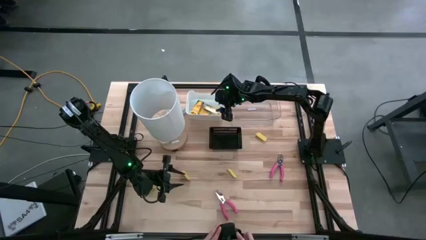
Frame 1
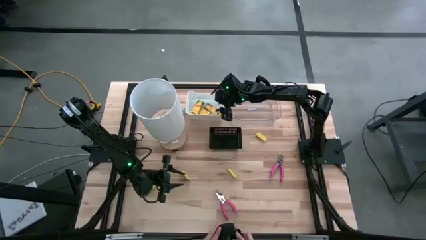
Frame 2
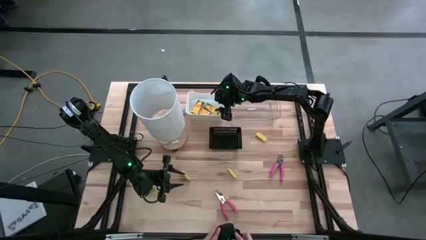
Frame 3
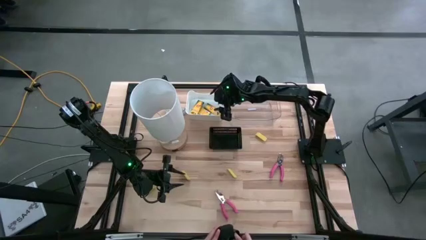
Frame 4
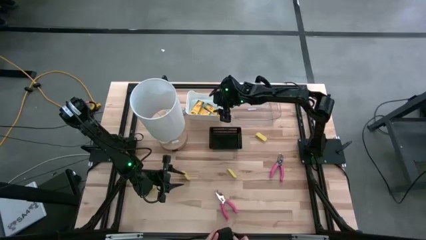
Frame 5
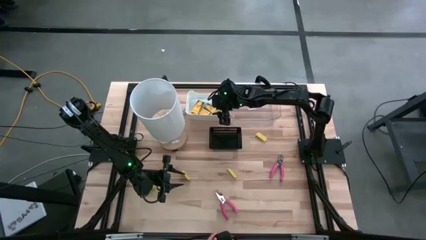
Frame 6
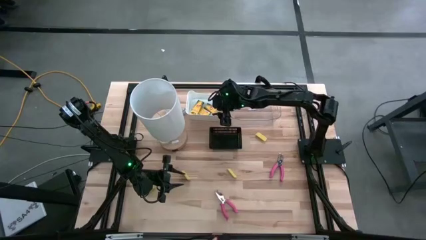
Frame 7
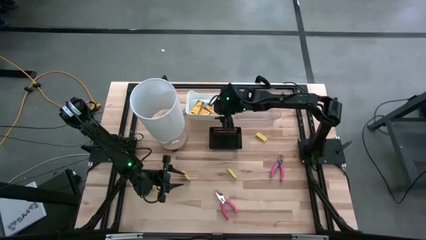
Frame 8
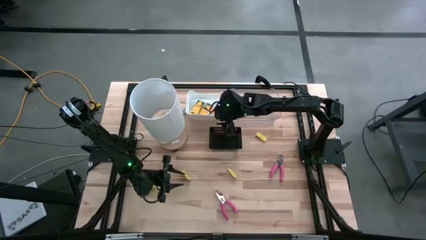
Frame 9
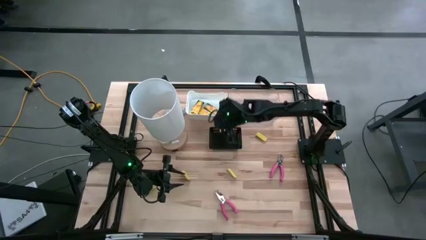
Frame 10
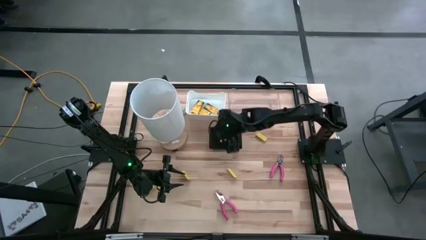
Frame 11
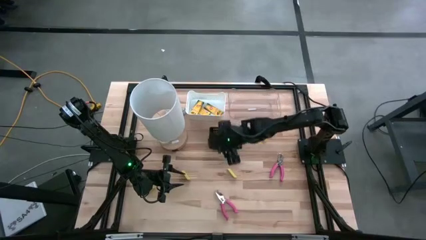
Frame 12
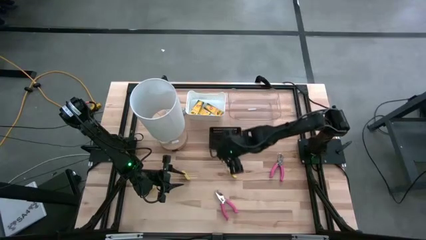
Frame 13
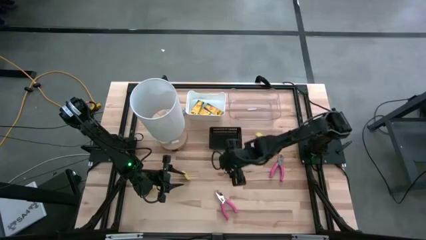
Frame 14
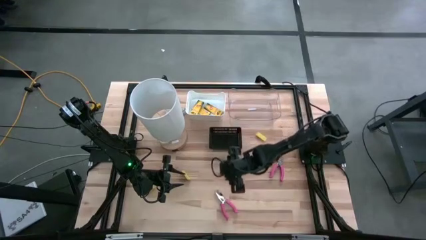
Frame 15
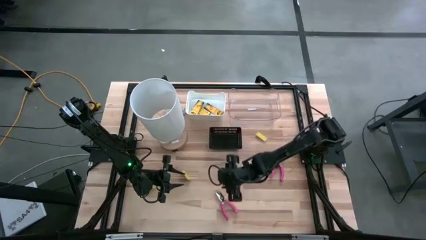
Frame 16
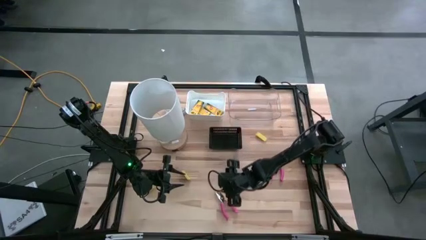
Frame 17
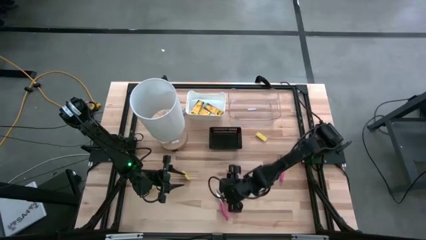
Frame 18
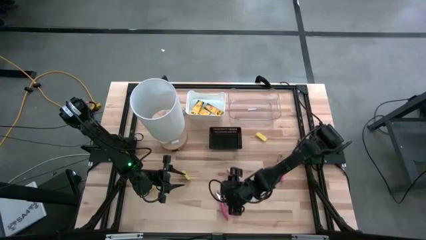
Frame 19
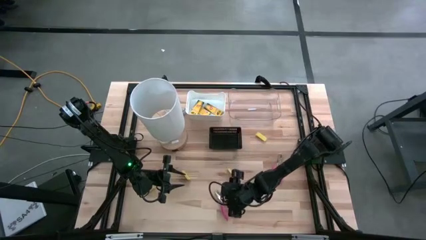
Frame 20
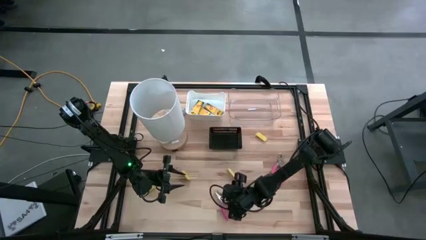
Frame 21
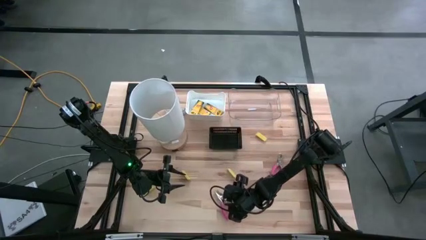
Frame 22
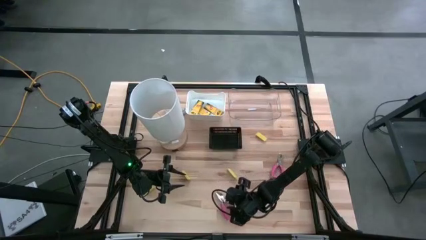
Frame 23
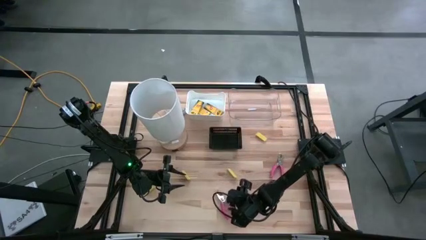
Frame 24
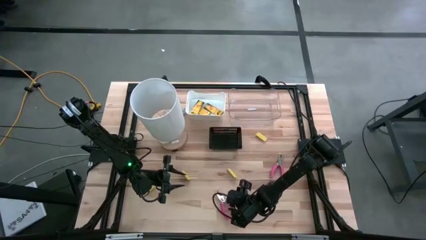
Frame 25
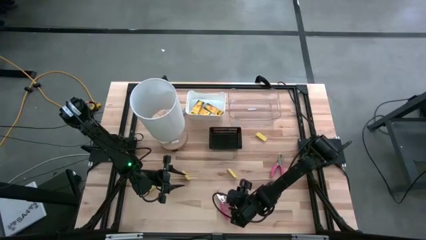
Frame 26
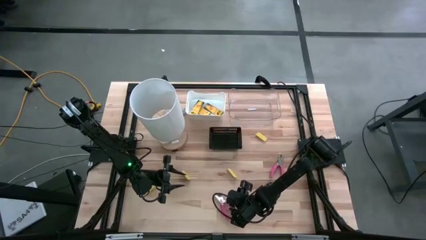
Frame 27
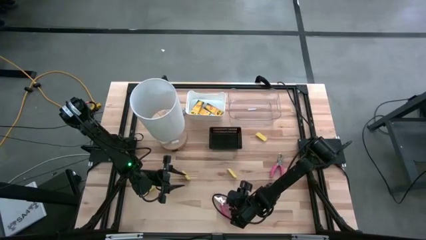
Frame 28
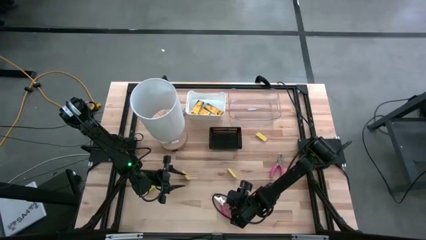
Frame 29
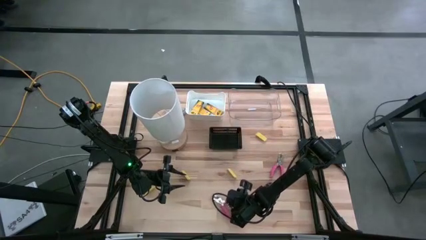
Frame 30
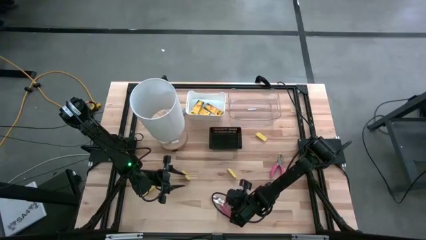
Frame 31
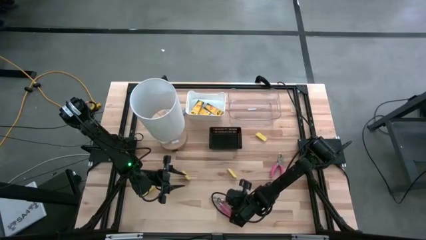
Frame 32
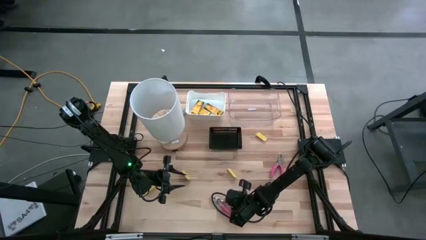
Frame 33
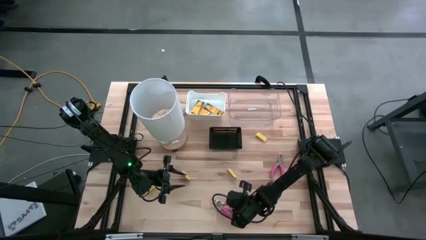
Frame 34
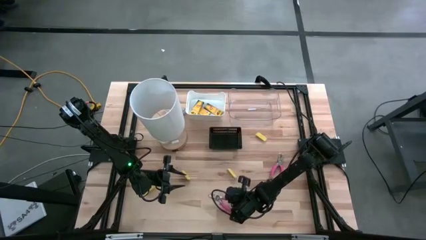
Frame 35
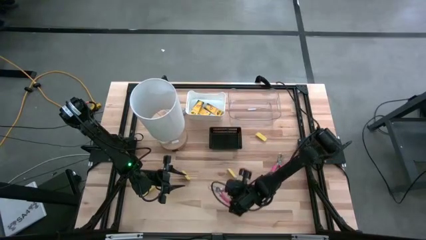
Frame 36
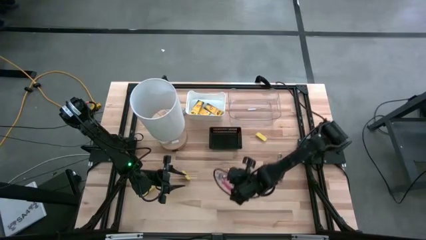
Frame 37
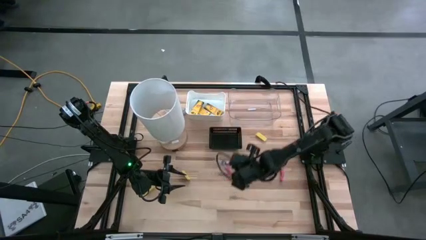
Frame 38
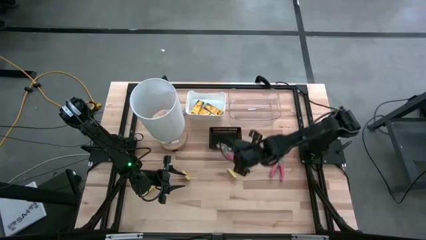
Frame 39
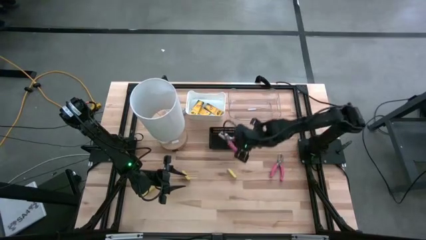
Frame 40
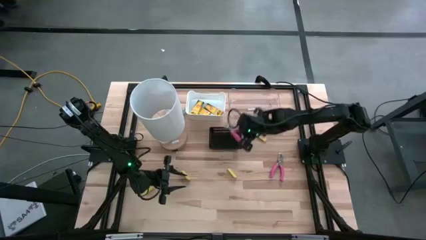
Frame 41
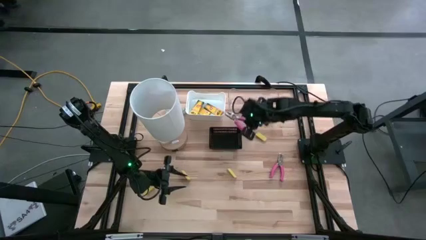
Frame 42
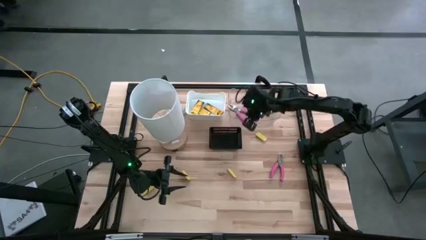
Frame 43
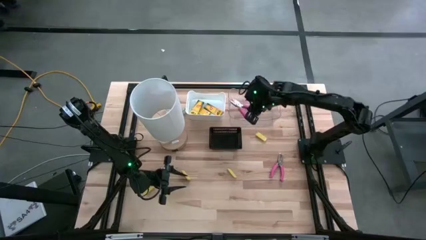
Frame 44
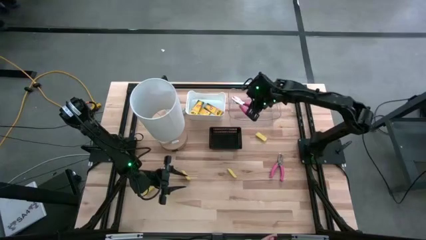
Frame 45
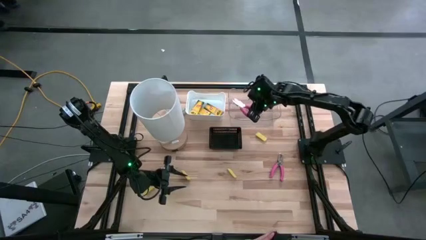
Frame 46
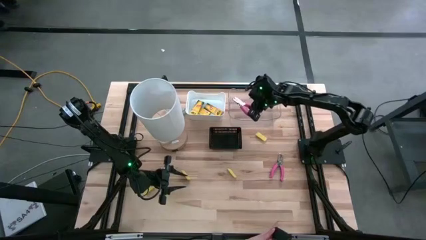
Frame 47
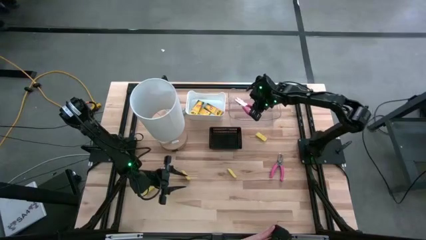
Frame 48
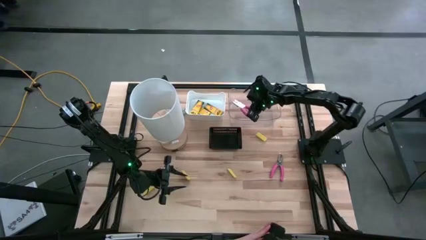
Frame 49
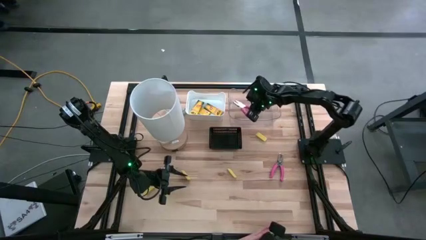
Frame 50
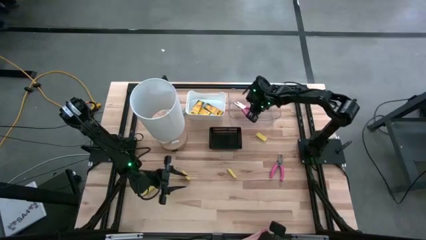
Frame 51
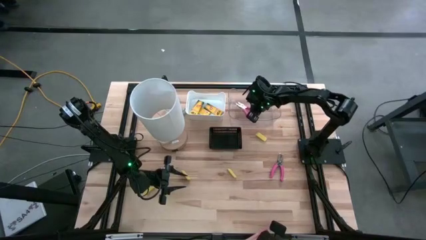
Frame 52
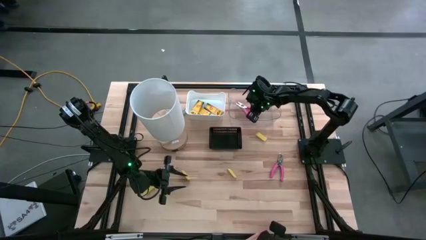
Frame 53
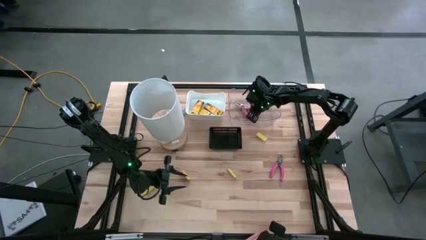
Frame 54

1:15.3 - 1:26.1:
Task: Pick & Place School Supplies
Put the pink hole puncher into the transparent bin

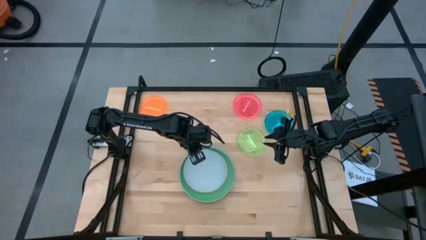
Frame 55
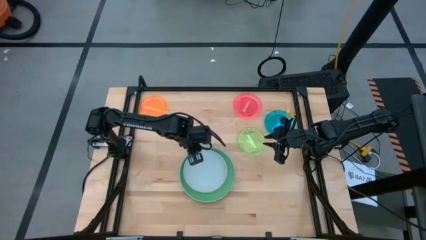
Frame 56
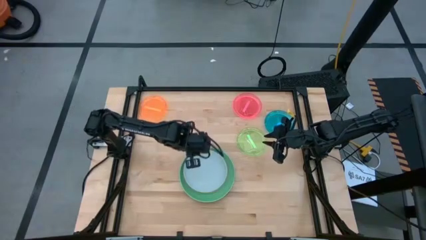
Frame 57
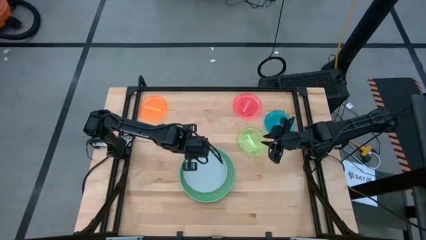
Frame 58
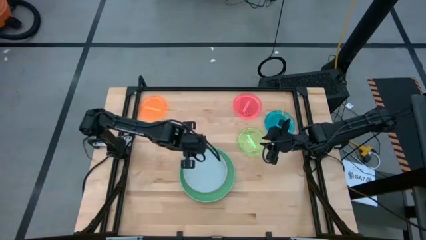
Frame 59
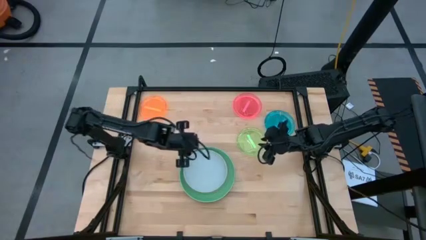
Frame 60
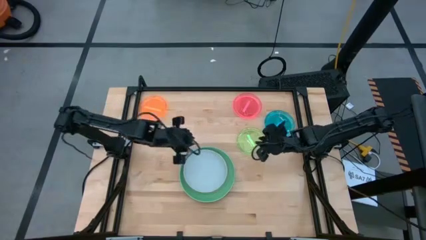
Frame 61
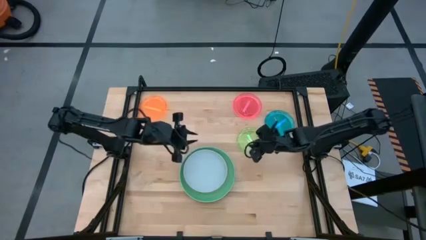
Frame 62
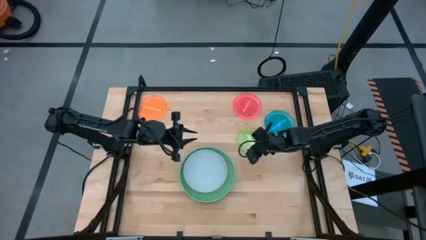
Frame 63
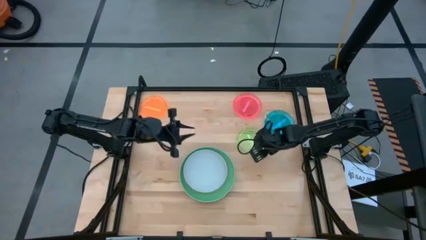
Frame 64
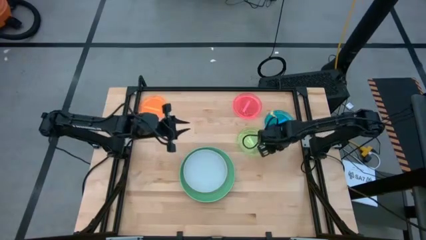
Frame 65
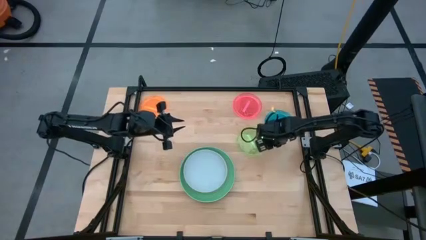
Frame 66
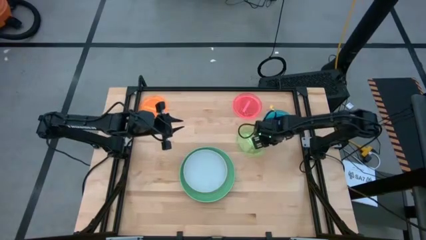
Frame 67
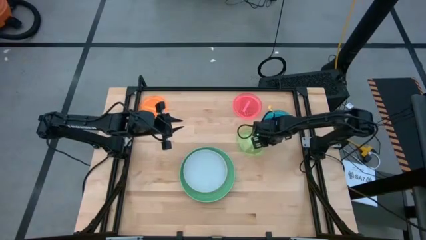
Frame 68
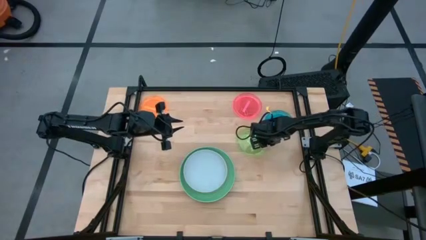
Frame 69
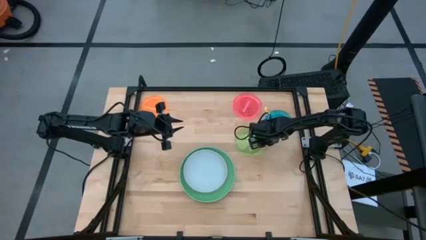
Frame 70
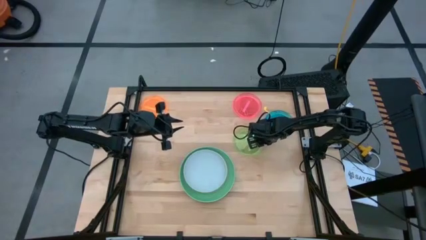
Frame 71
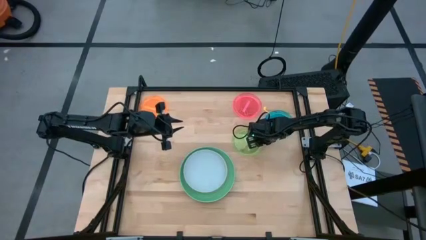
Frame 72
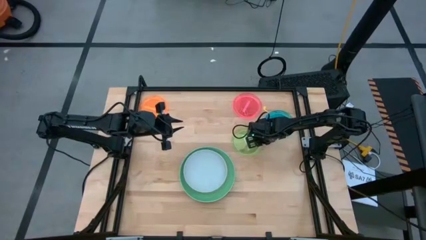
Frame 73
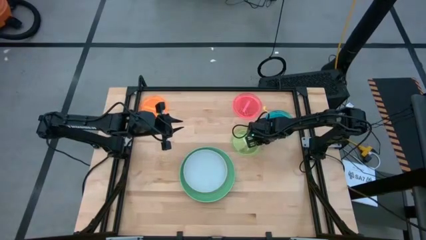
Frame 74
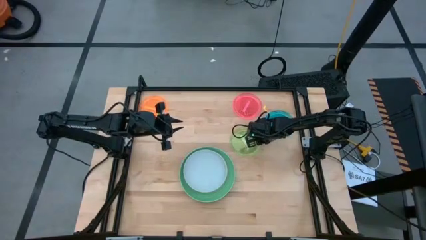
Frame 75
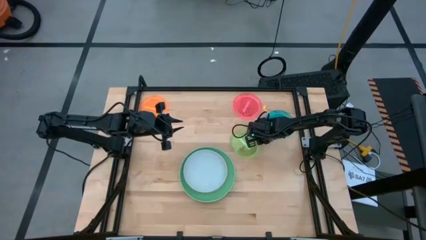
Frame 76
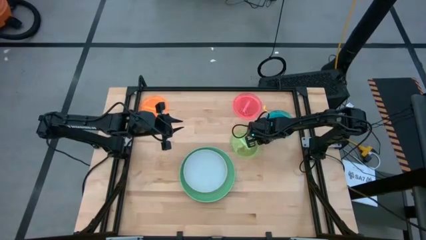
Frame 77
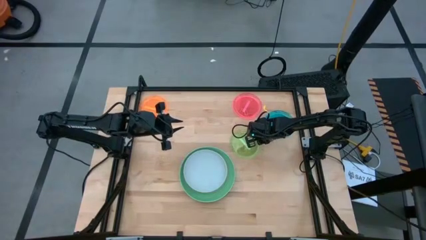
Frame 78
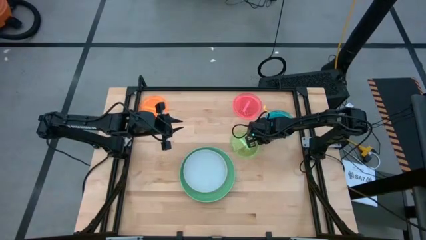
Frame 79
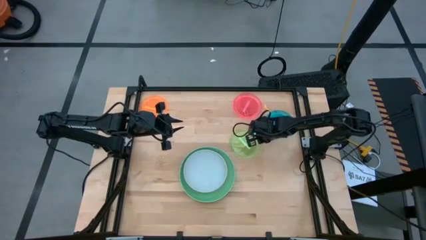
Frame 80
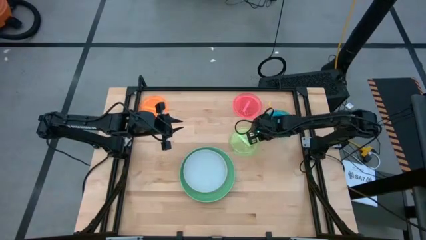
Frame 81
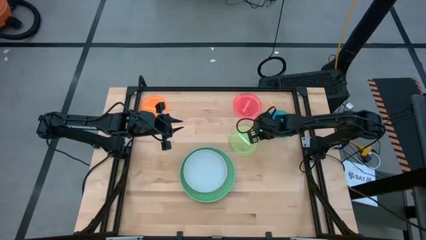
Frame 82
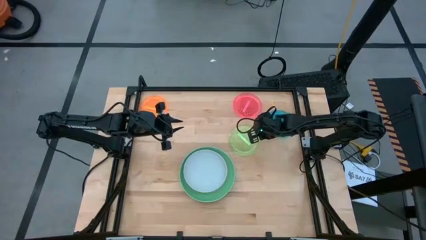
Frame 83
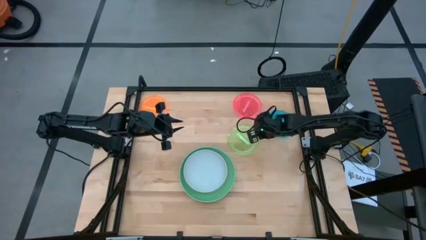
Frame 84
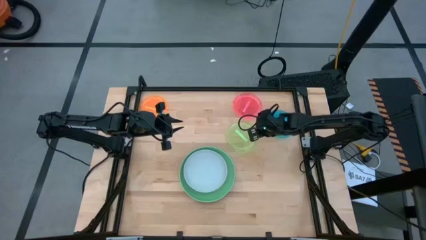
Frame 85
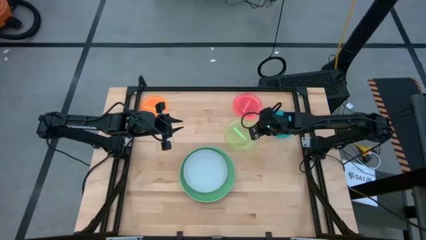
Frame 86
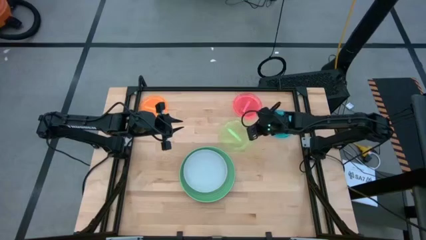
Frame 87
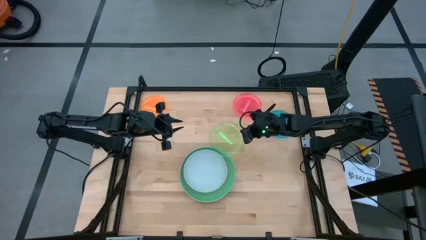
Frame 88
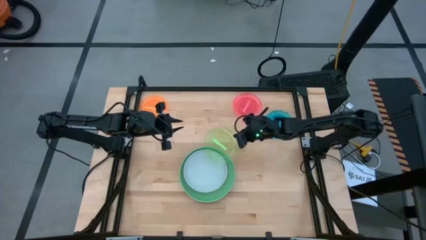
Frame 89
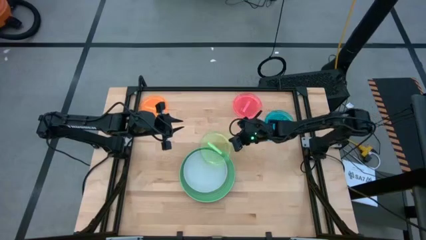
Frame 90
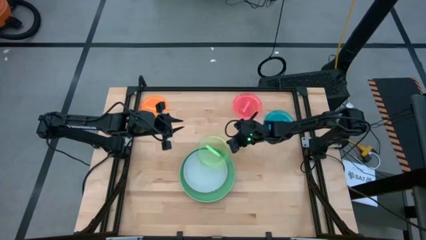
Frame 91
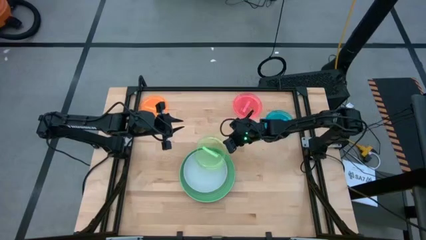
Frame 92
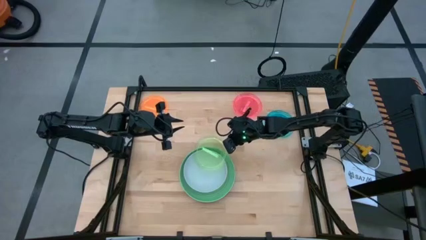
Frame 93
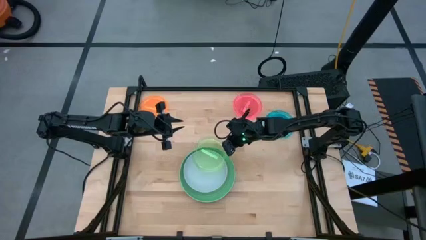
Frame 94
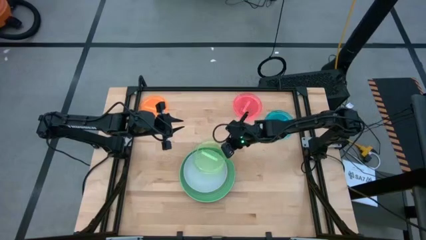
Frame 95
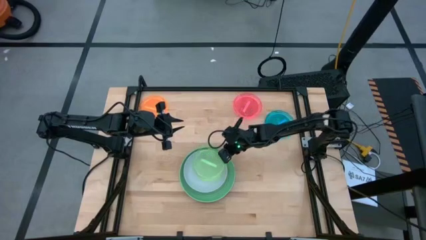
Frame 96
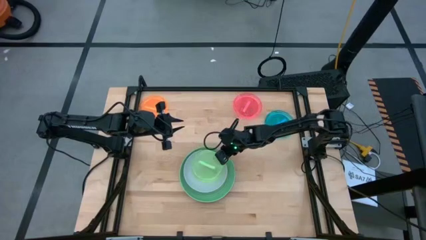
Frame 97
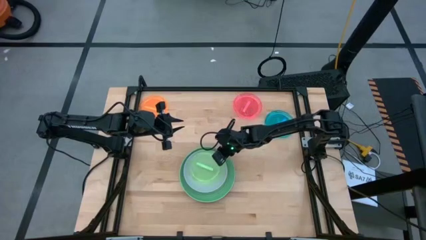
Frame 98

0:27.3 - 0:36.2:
Task: Stack plastic plates
Stack the small green plate on the large light blue plate
